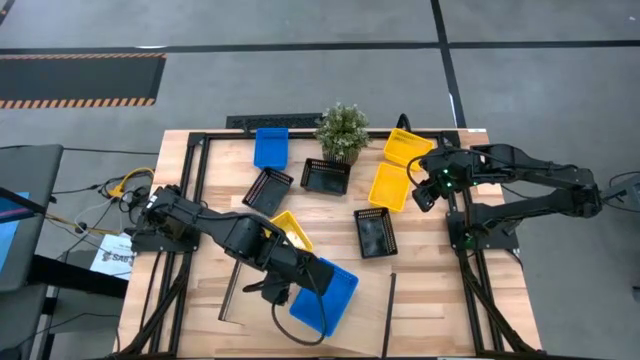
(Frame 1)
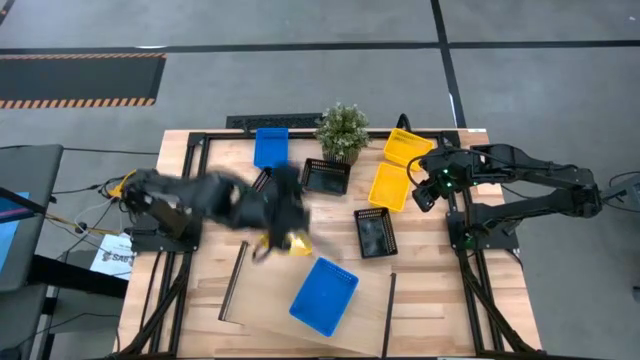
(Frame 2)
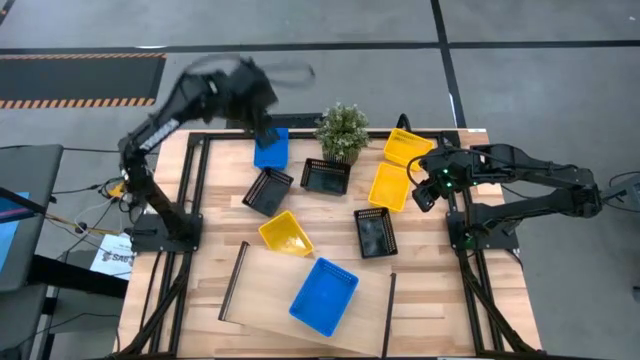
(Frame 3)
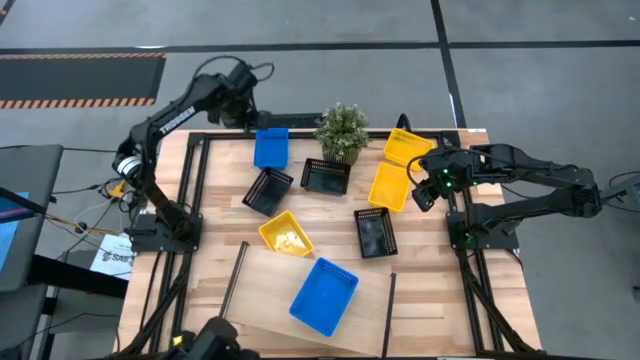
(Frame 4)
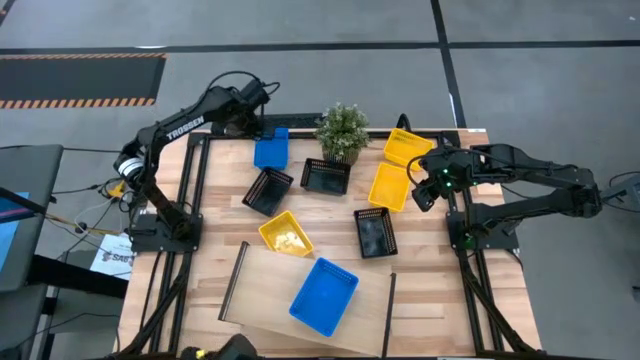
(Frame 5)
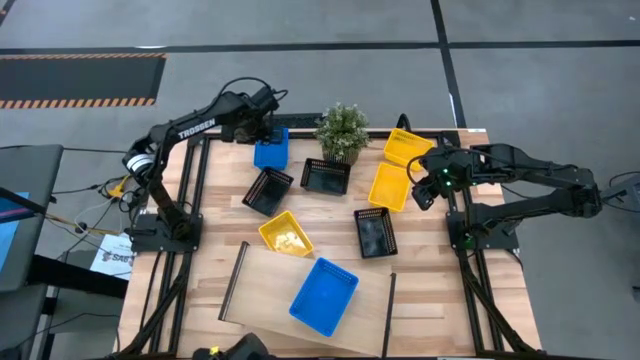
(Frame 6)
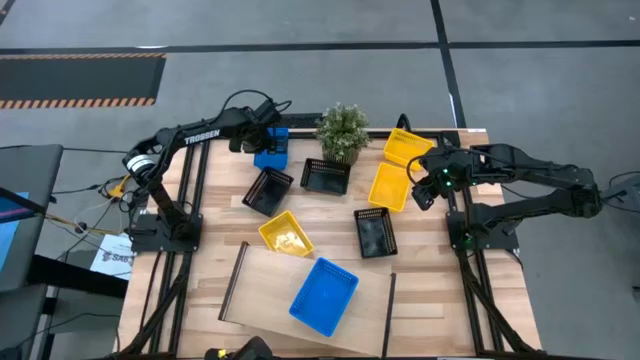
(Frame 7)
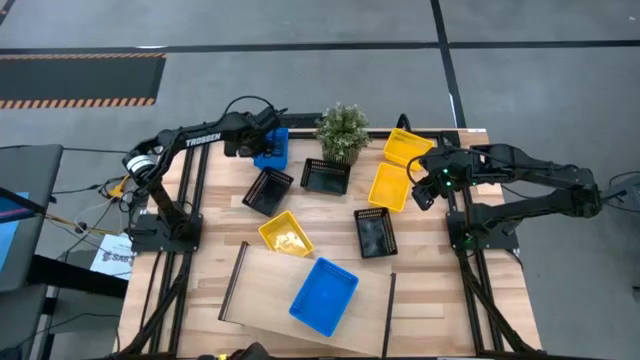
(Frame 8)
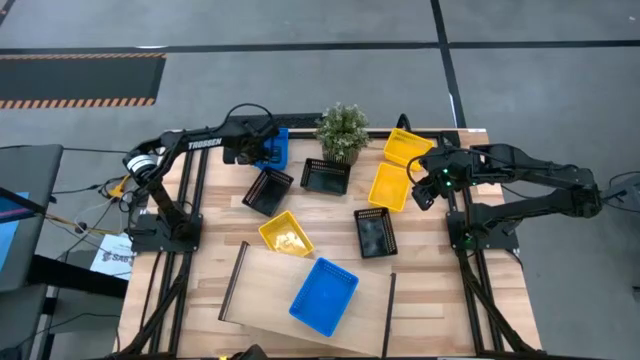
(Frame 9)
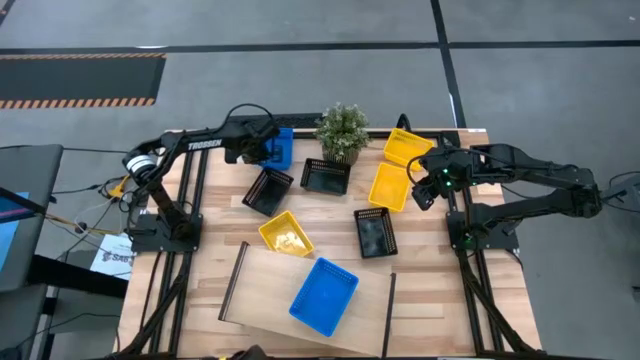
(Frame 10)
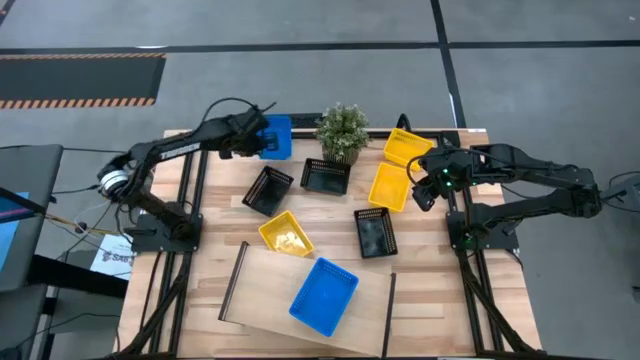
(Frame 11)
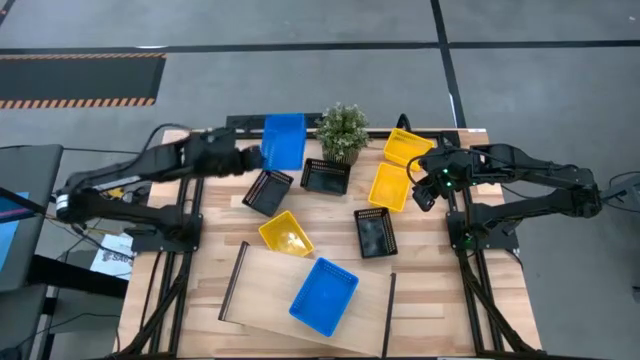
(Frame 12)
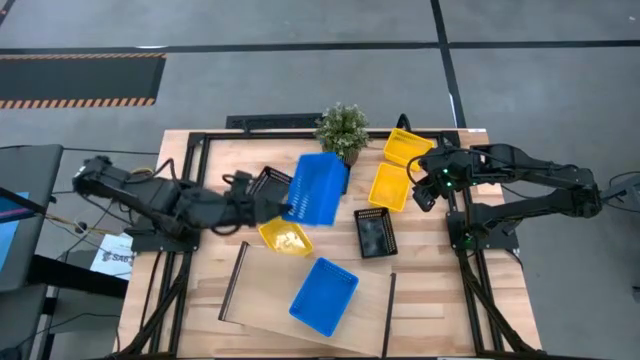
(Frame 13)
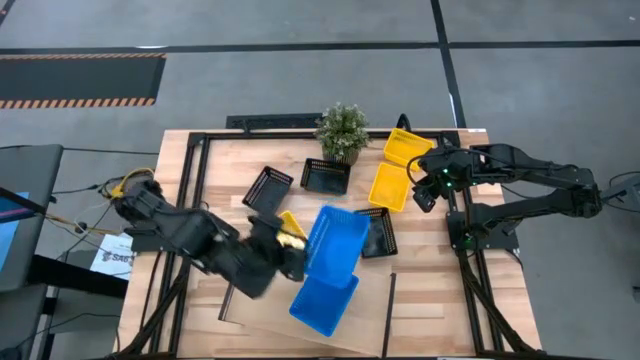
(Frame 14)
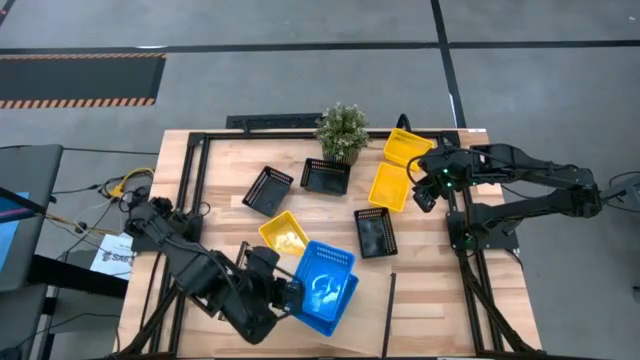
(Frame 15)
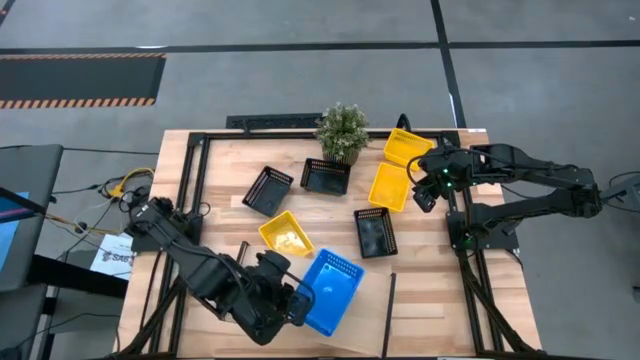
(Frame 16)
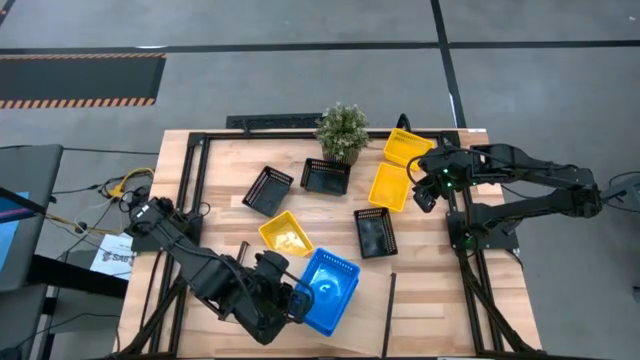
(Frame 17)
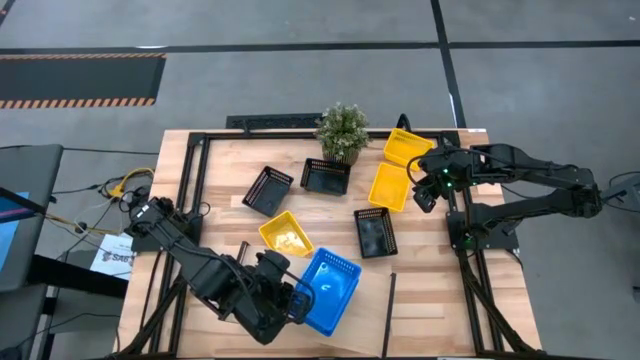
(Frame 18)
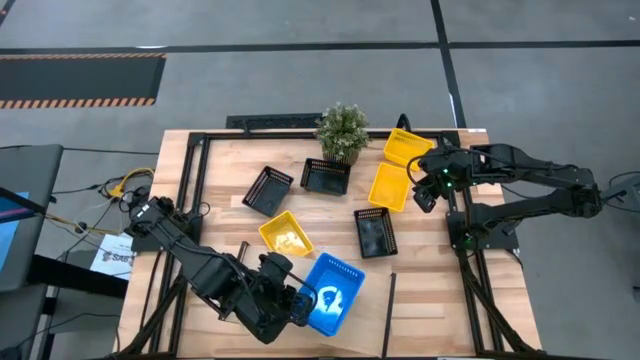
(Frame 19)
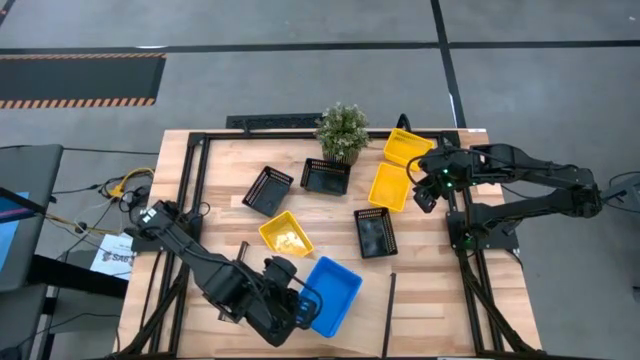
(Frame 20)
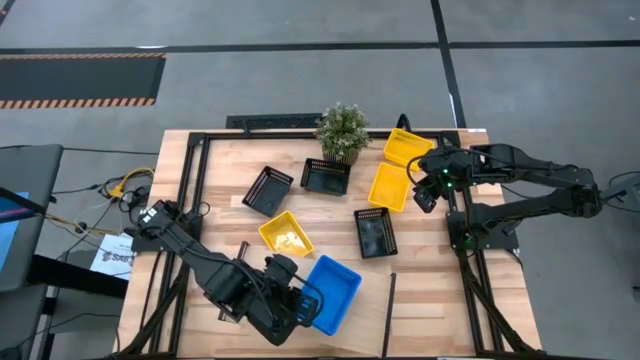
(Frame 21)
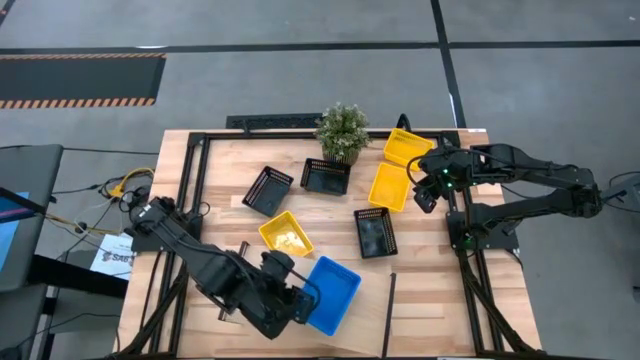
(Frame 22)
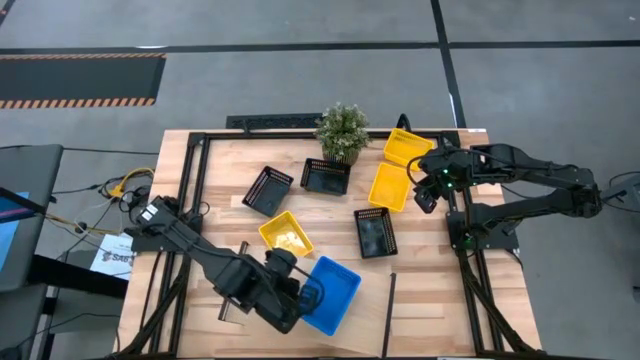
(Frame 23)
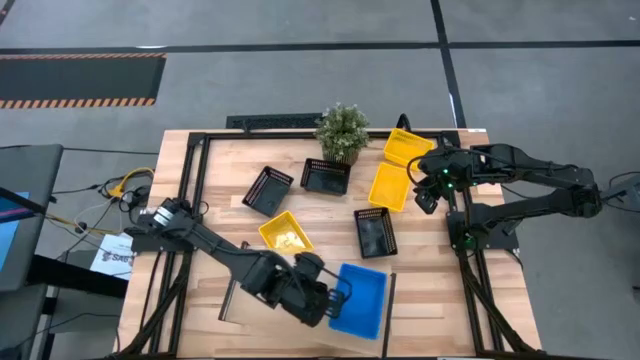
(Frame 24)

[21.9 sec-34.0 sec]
Task: Stack baskets on shelf by color
Stack the blue bin on top of the blue bin on the shelf

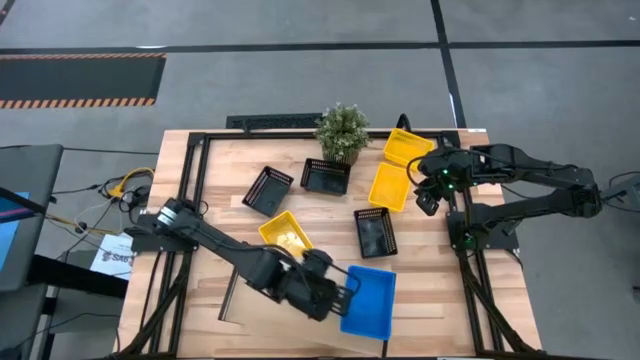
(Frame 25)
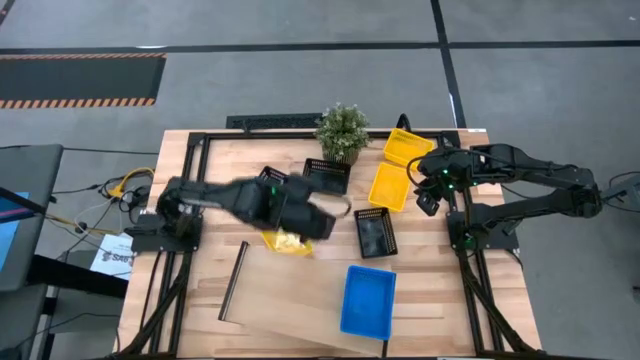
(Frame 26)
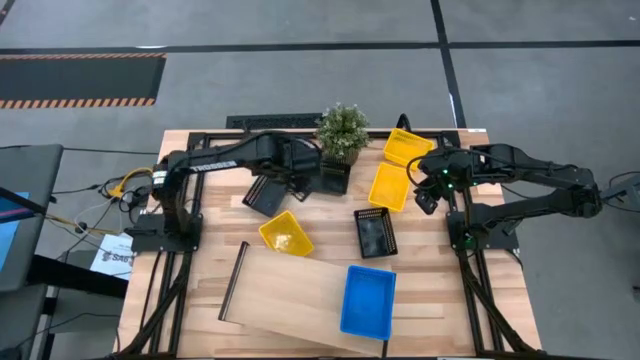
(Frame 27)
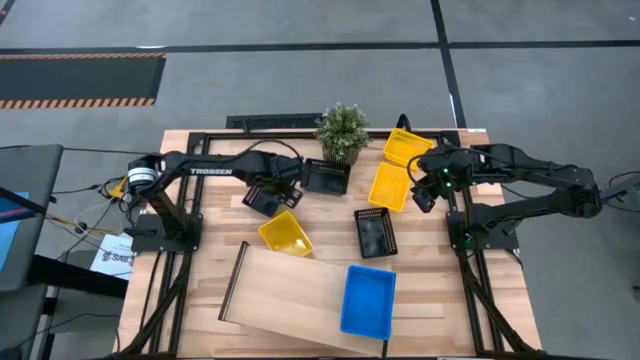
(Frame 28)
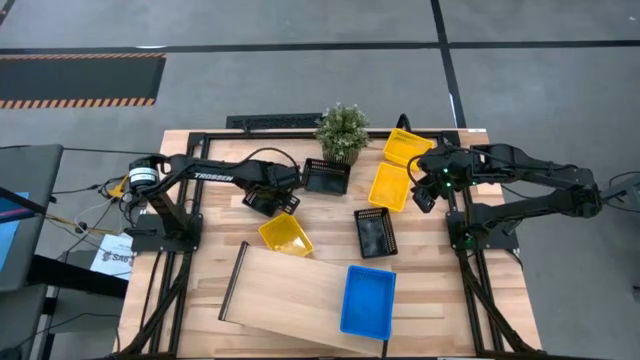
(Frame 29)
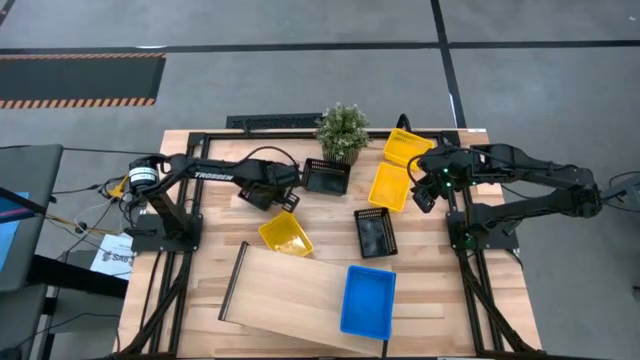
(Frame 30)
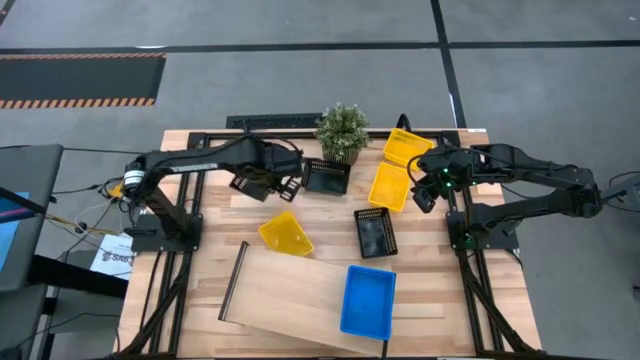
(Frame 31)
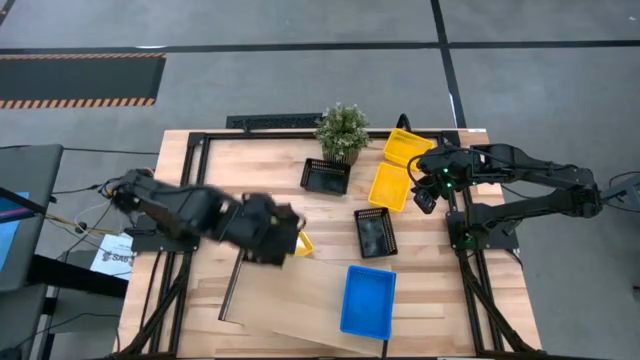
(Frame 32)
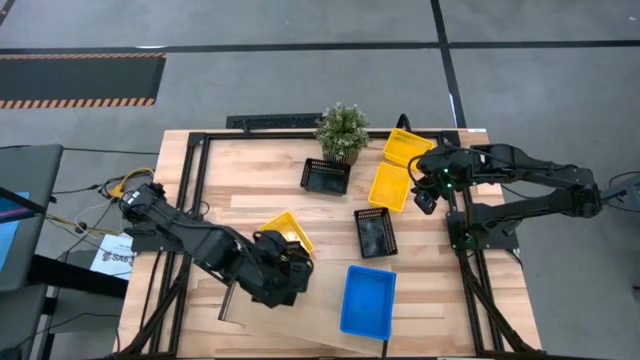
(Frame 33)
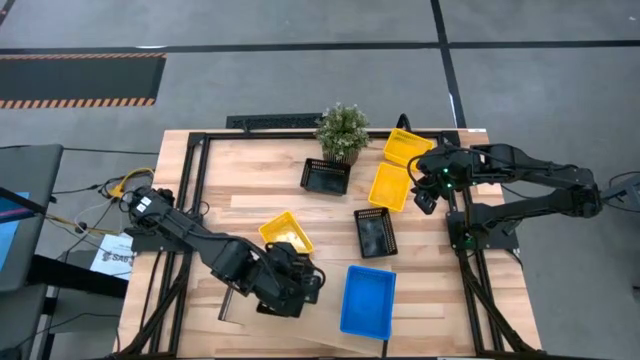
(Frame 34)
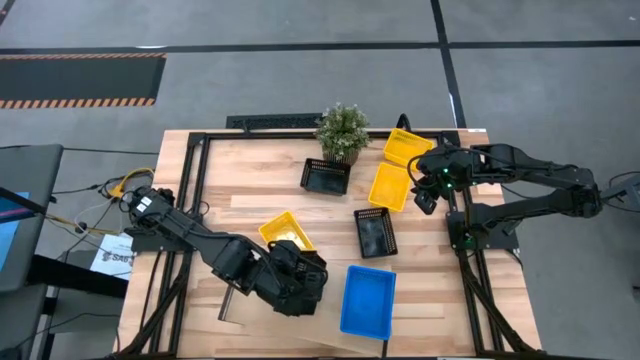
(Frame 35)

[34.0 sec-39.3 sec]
Put the left black bin on the shelf

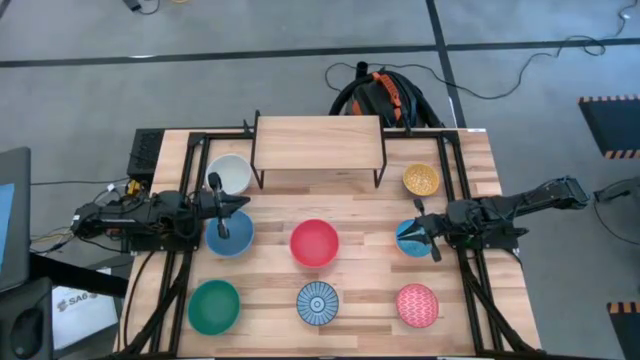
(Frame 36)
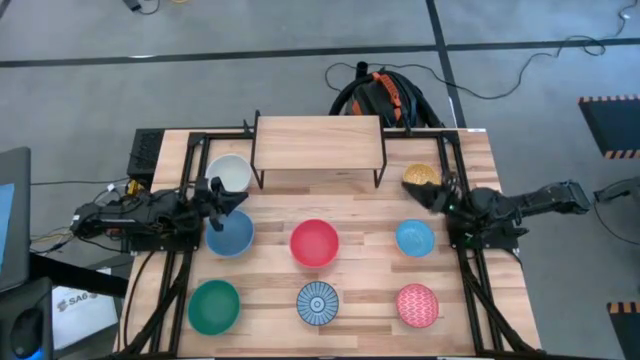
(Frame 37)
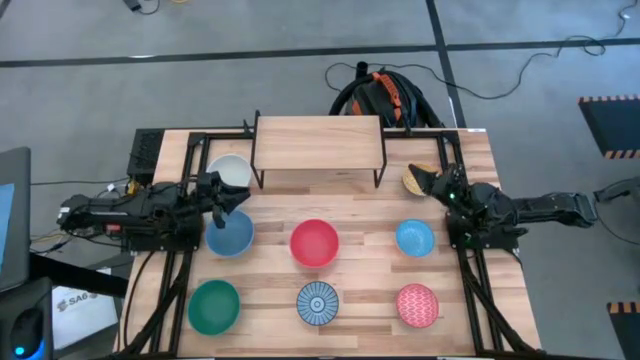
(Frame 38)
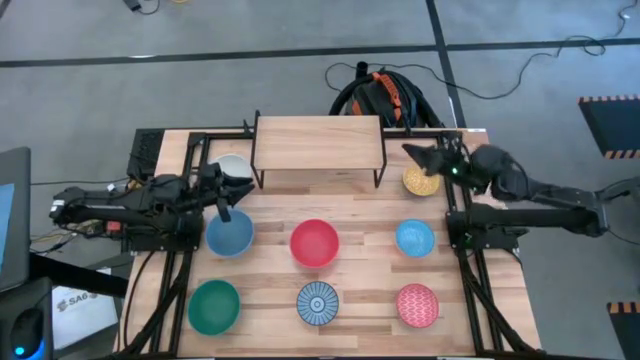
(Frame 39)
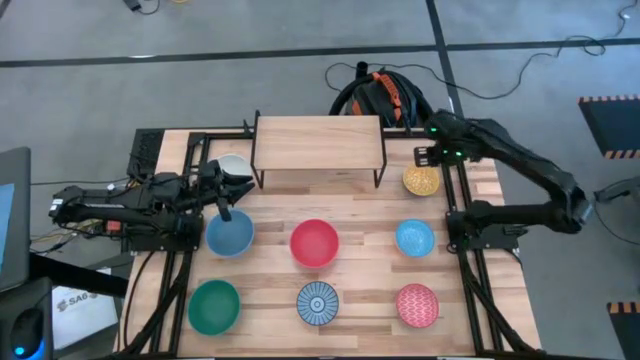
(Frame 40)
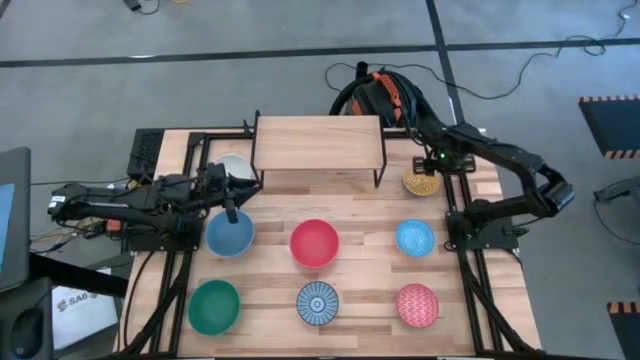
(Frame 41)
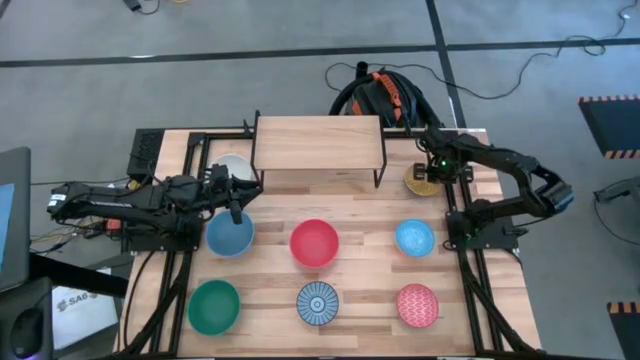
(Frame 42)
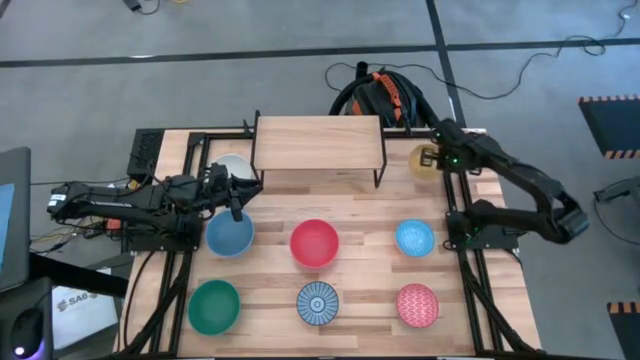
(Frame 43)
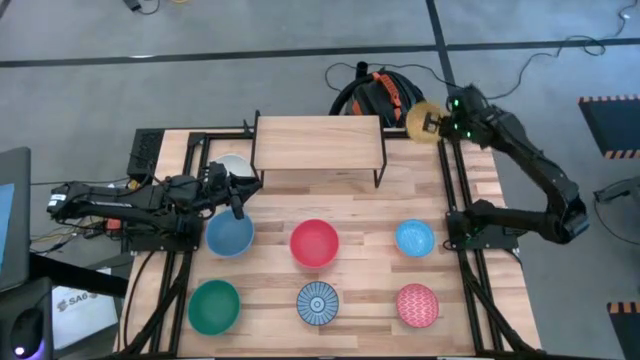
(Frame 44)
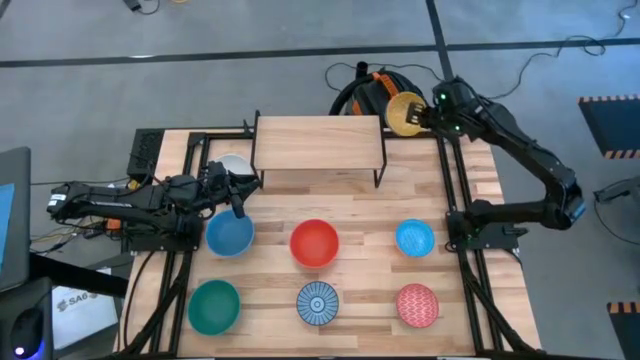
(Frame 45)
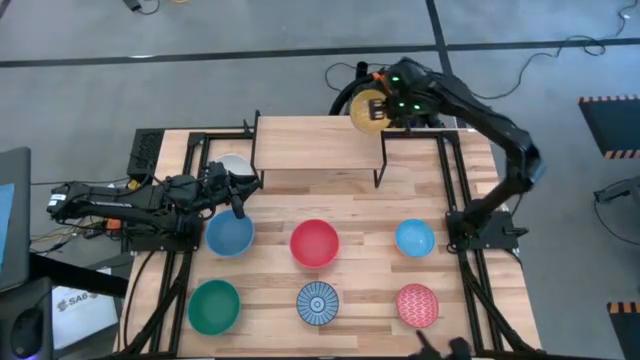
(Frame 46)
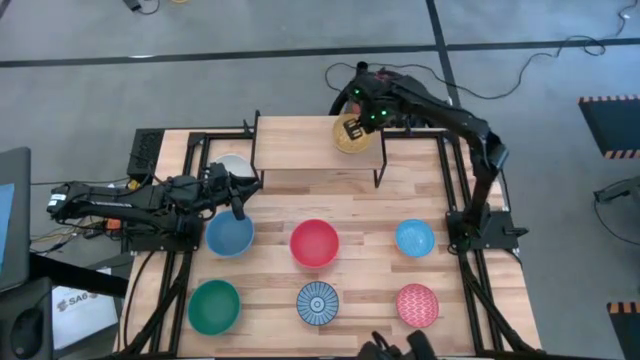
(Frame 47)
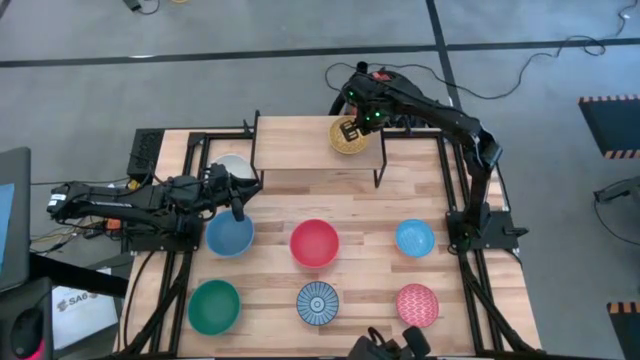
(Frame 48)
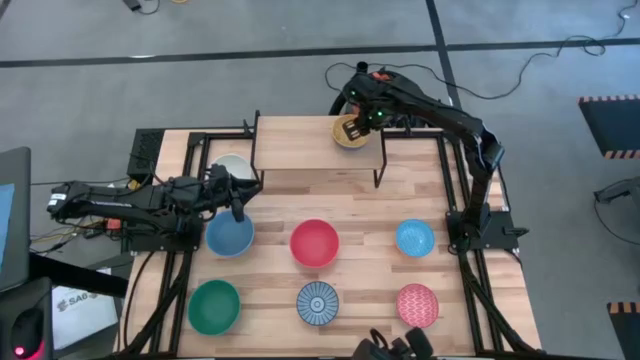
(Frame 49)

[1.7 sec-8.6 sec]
Task: Place and stack bowls onto a shelf
Put the yellow bowl on the shelf
